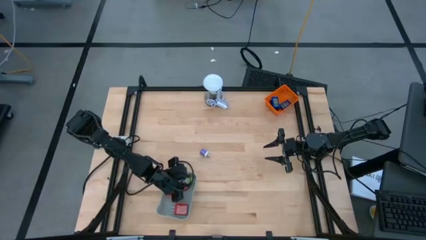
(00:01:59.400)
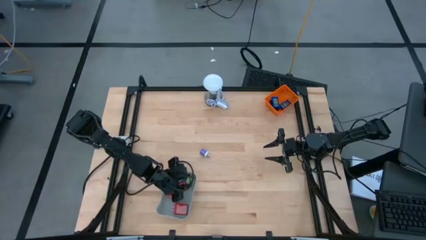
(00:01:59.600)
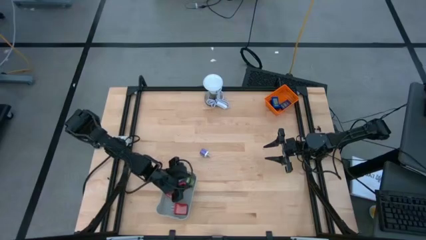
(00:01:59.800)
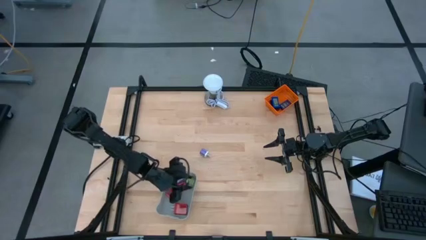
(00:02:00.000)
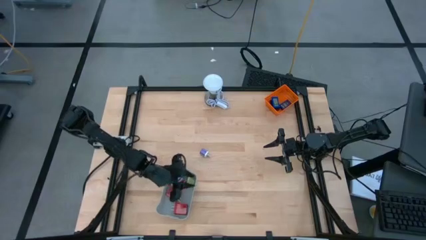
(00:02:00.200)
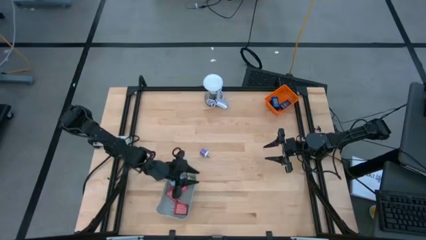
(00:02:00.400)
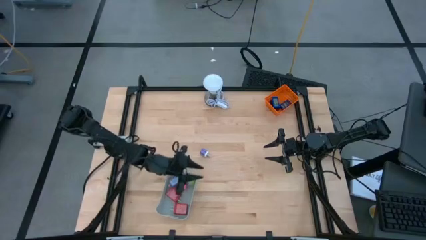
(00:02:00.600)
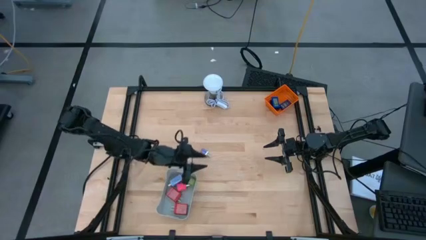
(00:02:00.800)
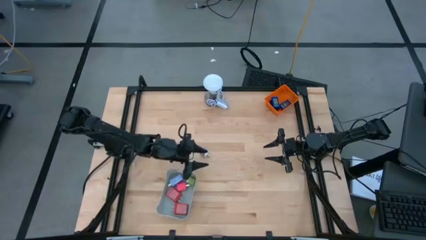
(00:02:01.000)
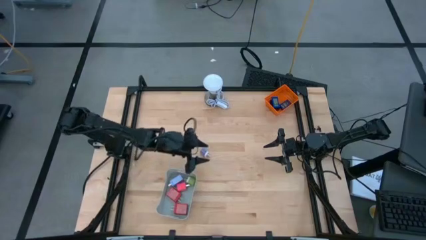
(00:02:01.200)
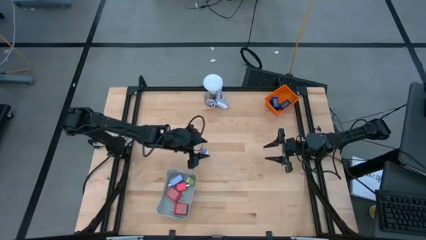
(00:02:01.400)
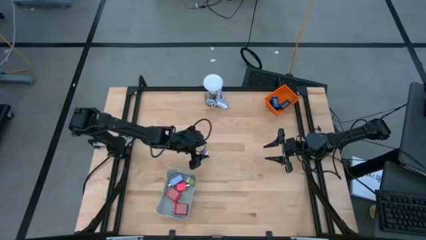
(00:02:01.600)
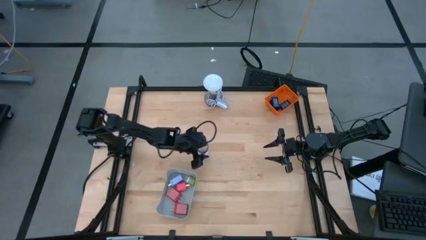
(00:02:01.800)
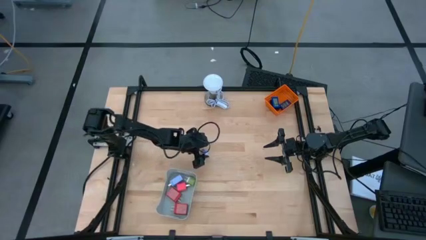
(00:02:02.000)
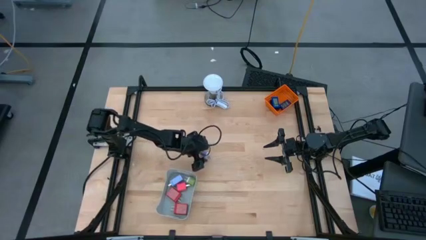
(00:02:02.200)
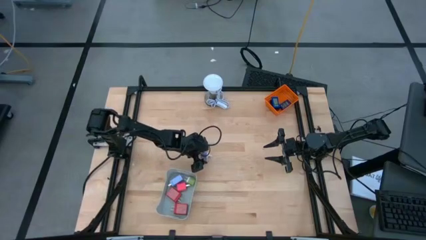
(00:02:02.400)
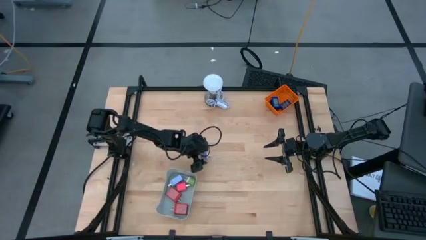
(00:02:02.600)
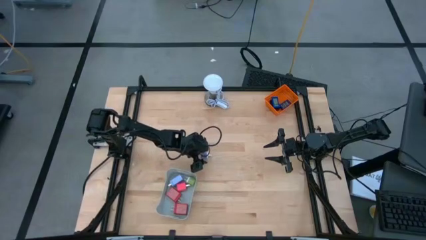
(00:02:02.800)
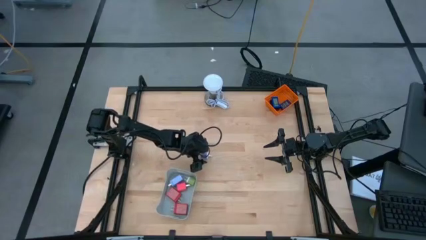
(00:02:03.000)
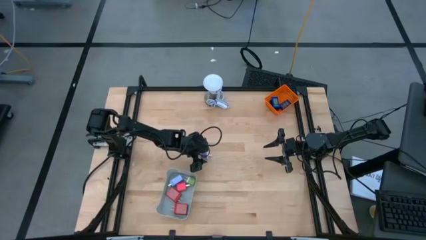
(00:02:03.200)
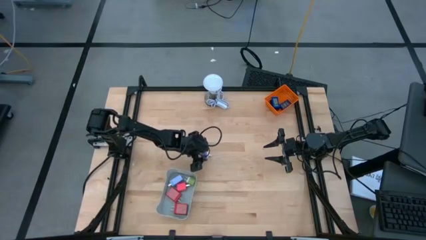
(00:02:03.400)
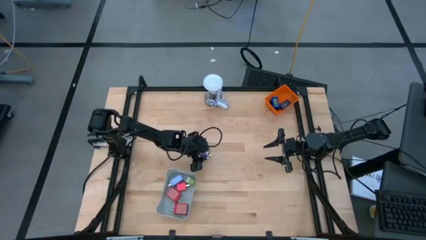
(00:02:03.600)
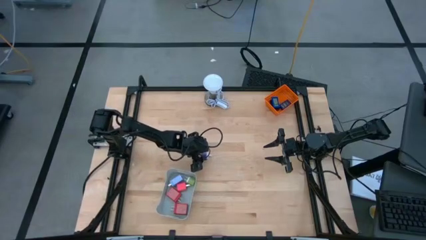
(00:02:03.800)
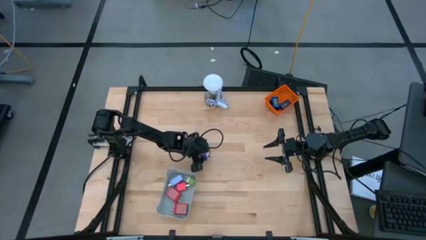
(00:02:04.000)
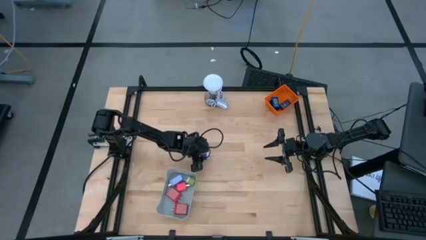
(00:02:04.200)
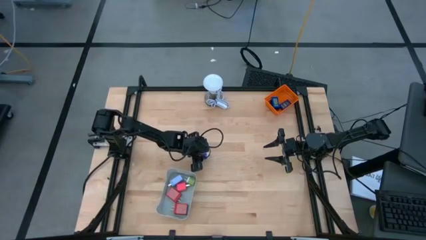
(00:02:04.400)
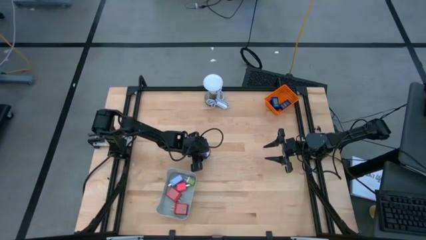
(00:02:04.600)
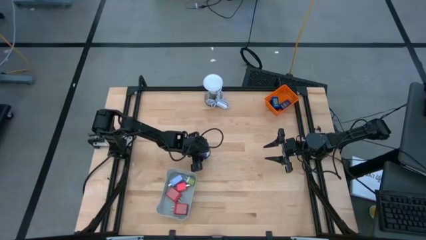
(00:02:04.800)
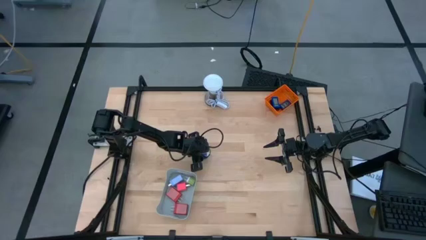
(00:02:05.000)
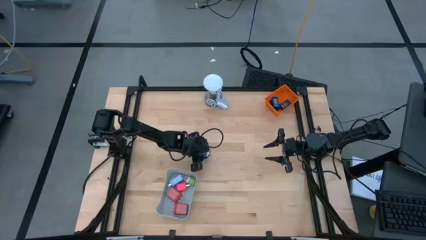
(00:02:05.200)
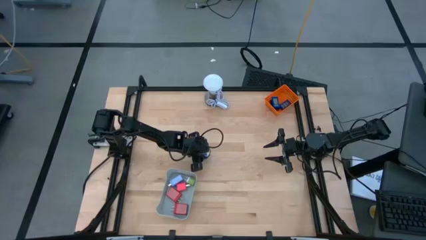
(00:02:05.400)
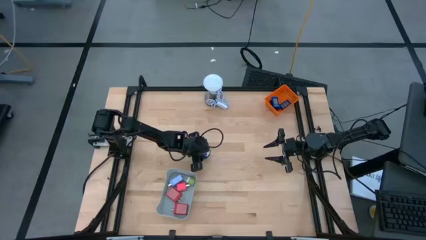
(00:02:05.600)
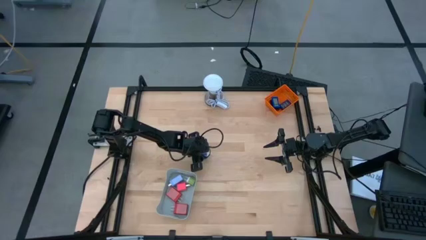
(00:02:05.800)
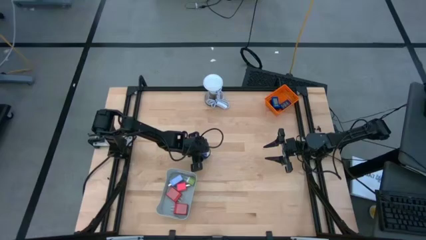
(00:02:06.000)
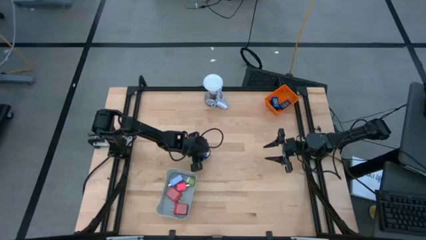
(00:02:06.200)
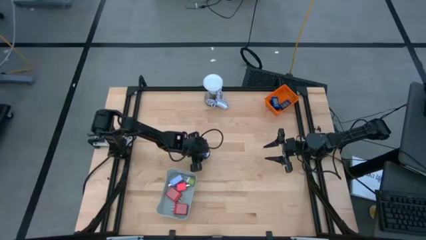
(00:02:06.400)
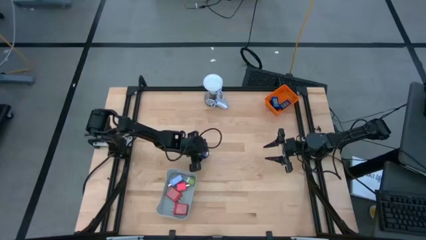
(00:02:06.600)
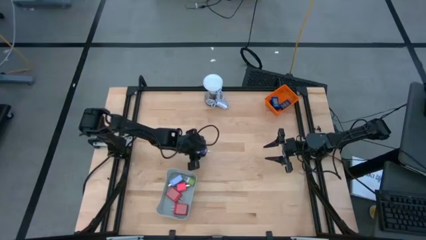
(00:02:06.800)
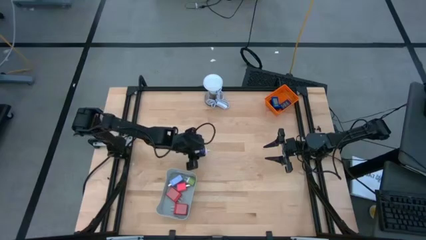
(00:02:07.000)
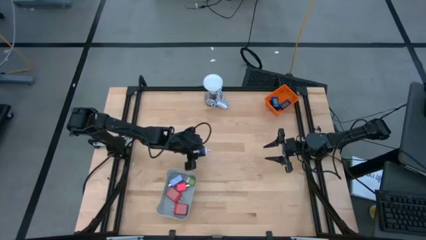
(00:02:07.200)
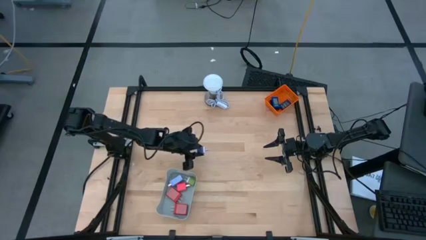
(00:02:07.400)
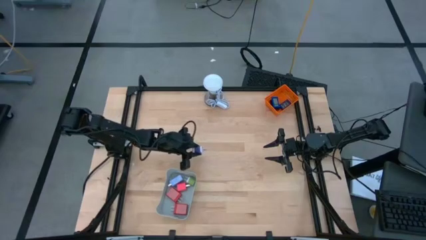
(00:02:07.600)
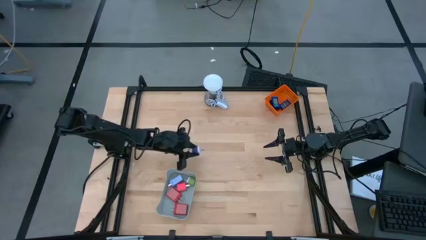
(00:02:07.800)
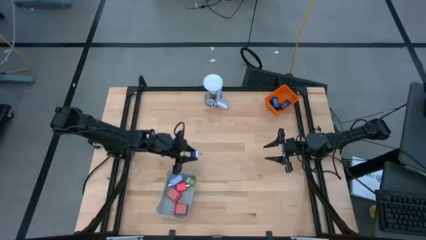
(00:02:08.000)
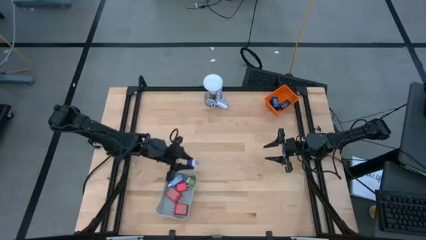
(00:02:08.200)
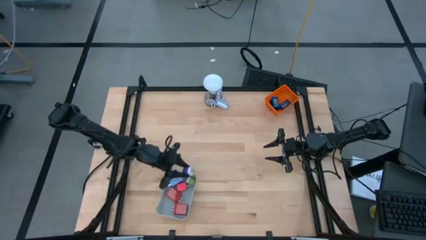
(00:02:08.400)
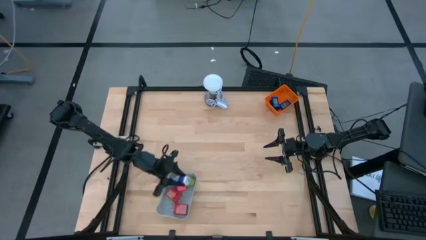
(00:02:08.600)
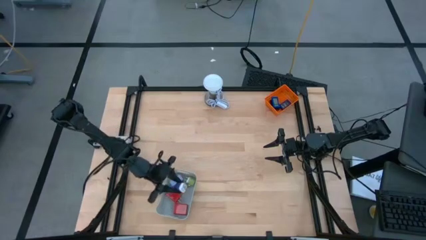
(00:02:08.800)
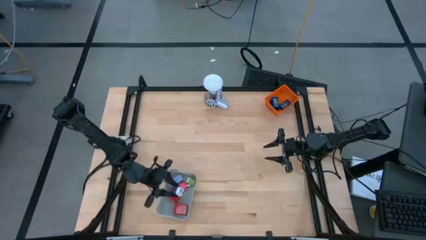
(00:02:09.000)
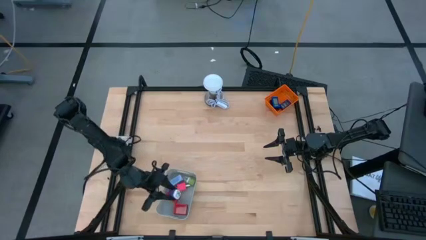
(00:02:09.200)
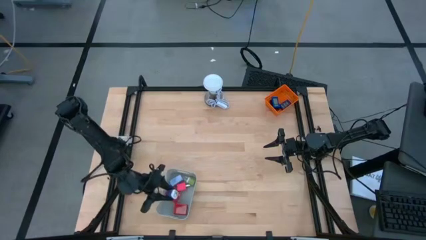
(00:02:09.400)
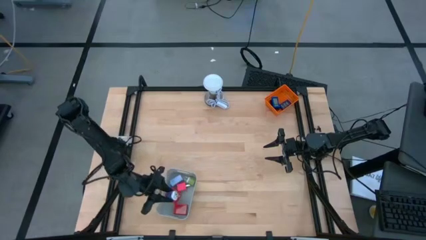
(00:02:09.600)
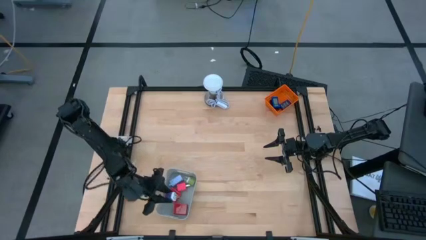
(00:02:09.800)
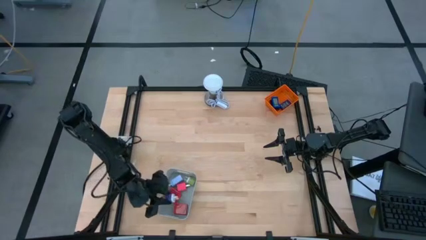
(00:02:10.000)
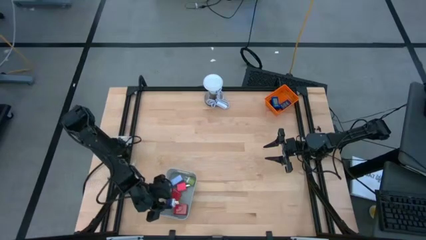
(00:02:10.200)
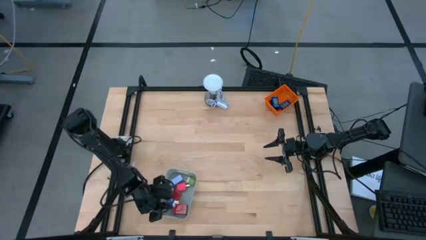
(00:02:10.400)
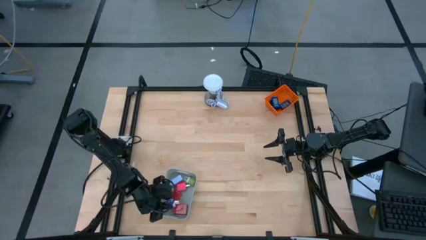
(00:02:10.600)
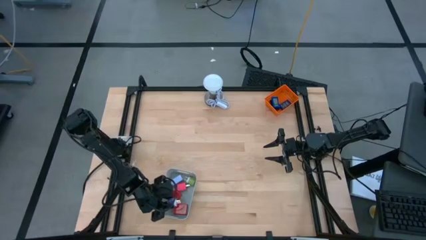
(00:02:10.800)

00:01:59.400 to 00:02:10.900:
Task: Pick & Place Office items
Put the blue charger adapter into the gray bin
